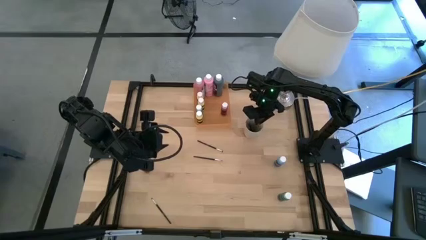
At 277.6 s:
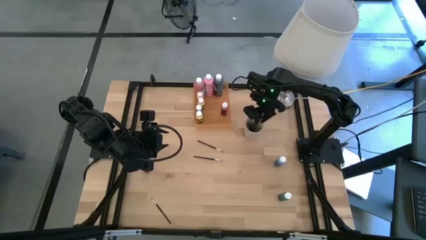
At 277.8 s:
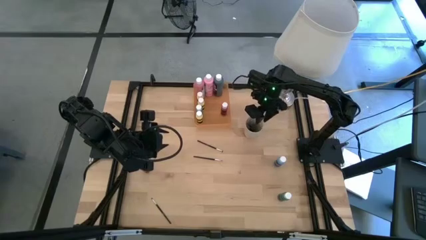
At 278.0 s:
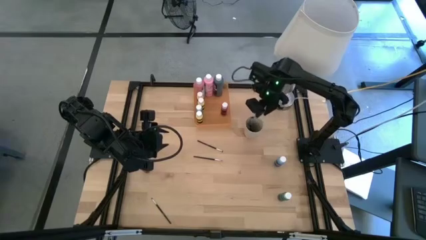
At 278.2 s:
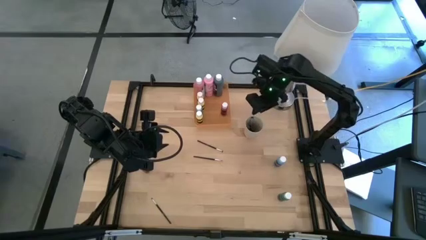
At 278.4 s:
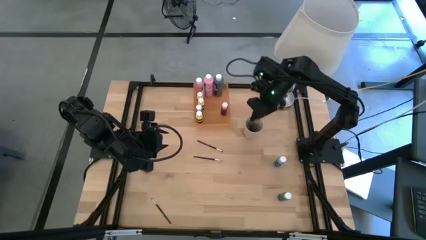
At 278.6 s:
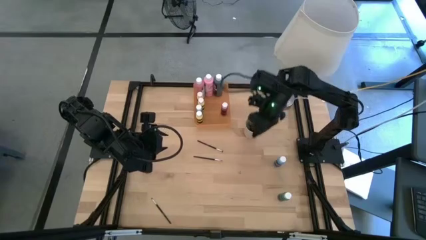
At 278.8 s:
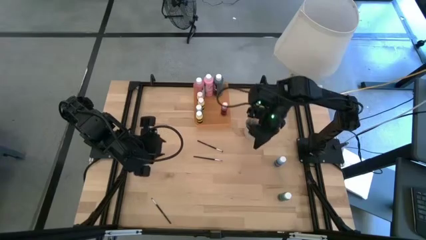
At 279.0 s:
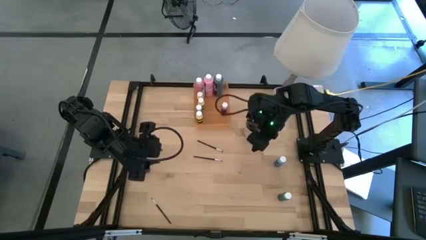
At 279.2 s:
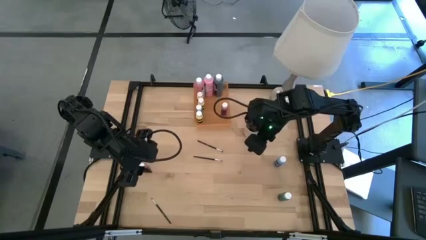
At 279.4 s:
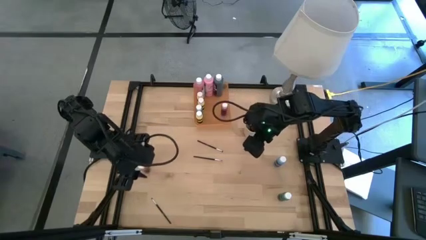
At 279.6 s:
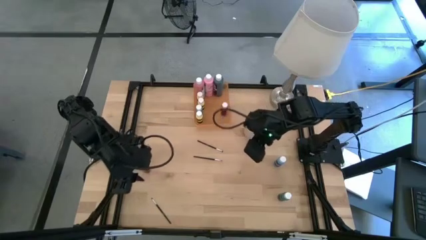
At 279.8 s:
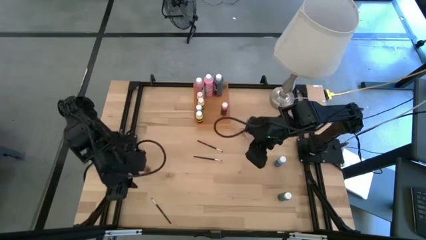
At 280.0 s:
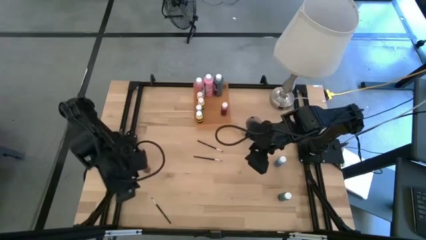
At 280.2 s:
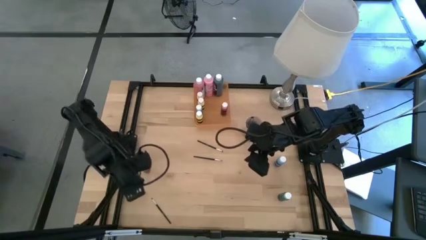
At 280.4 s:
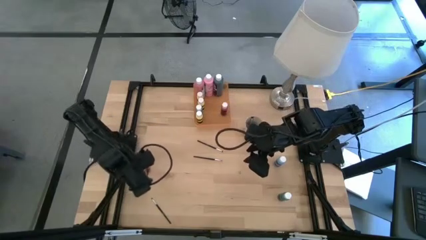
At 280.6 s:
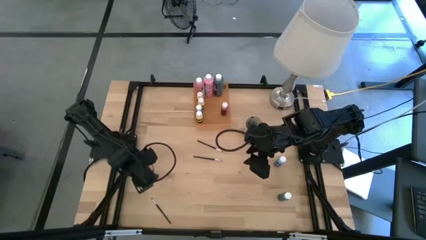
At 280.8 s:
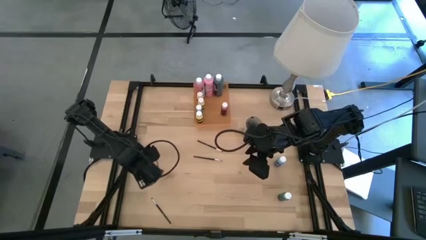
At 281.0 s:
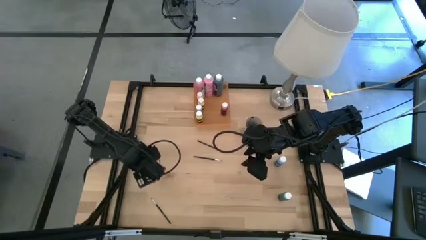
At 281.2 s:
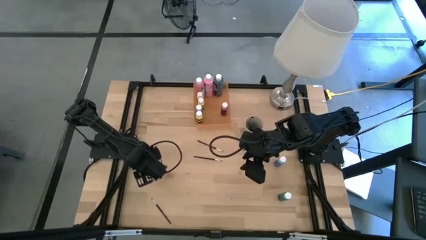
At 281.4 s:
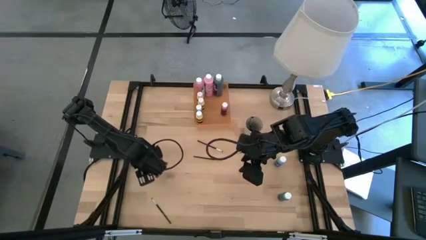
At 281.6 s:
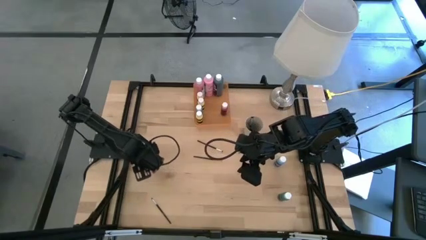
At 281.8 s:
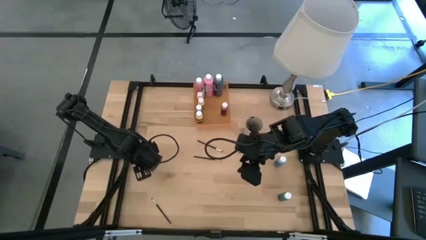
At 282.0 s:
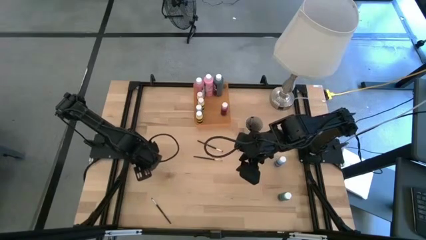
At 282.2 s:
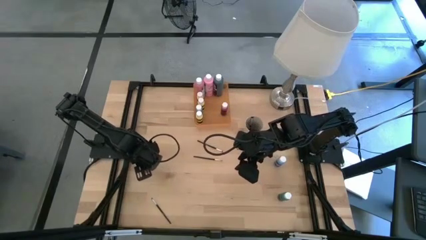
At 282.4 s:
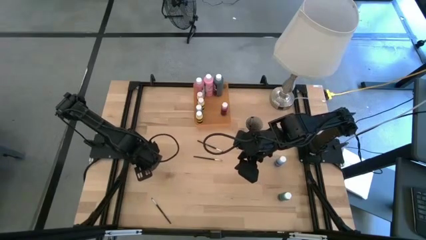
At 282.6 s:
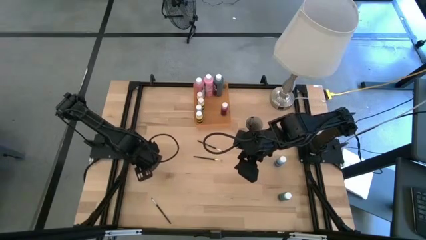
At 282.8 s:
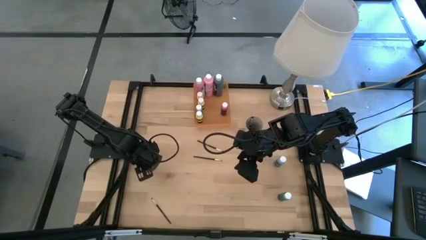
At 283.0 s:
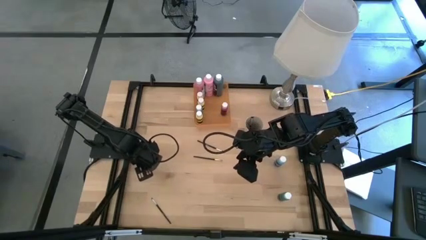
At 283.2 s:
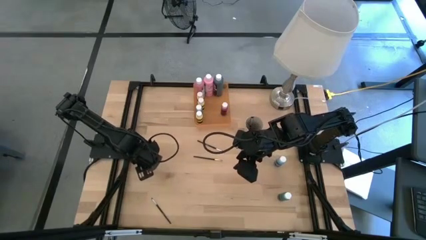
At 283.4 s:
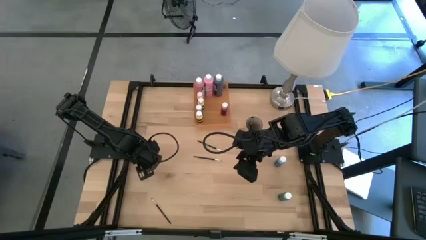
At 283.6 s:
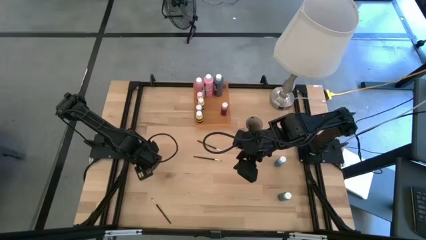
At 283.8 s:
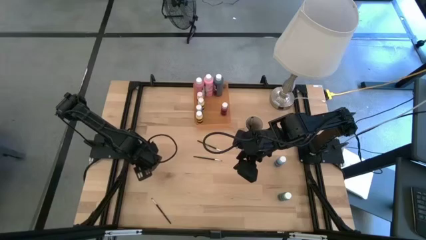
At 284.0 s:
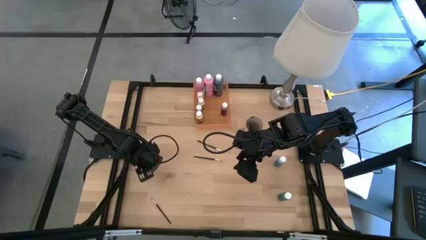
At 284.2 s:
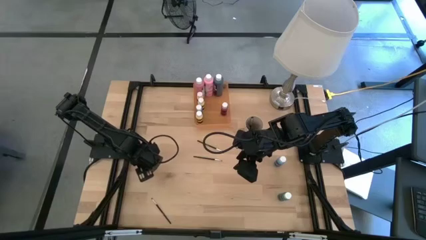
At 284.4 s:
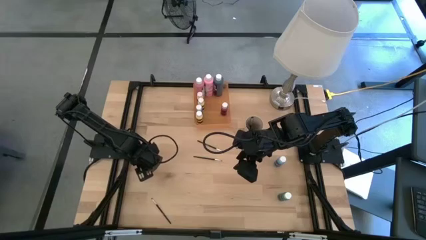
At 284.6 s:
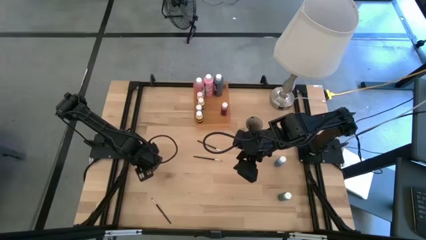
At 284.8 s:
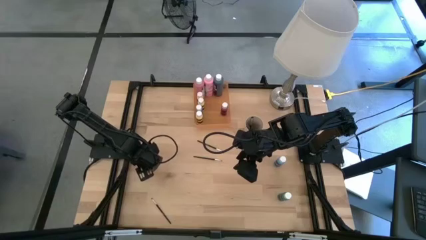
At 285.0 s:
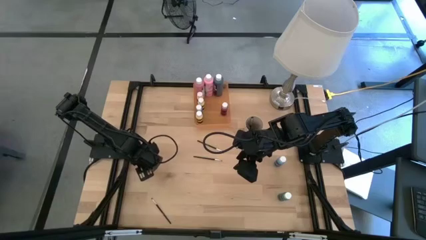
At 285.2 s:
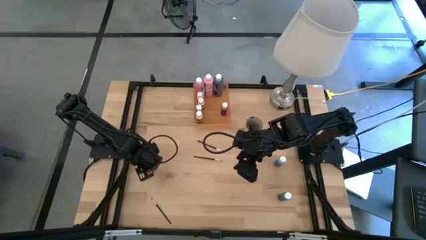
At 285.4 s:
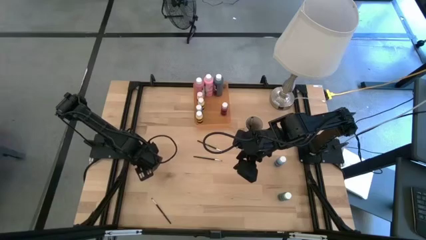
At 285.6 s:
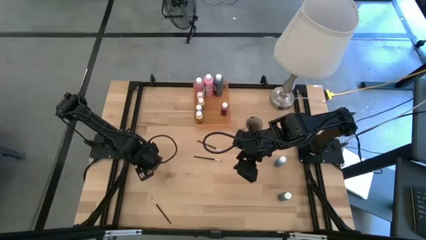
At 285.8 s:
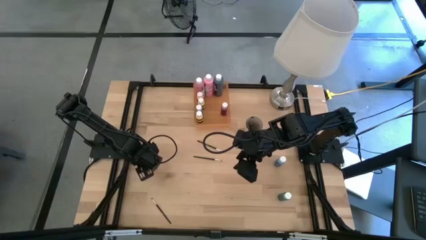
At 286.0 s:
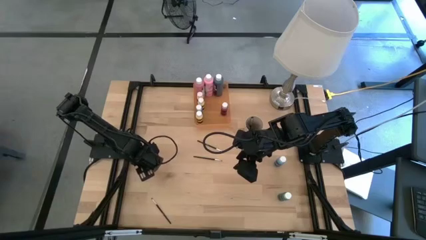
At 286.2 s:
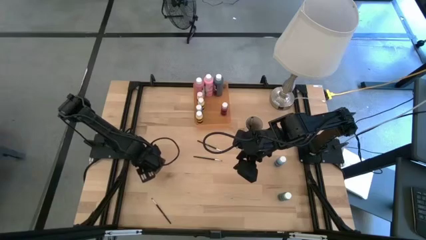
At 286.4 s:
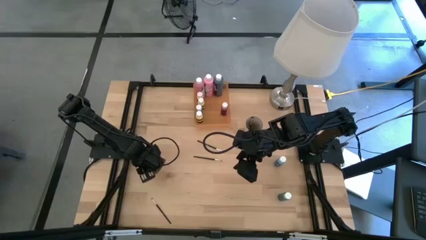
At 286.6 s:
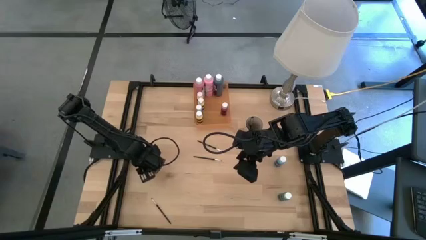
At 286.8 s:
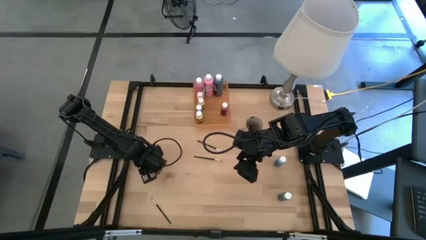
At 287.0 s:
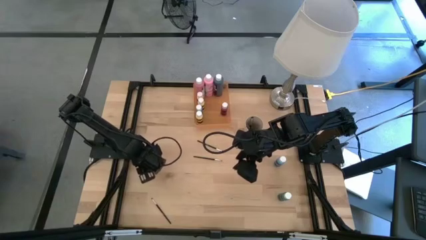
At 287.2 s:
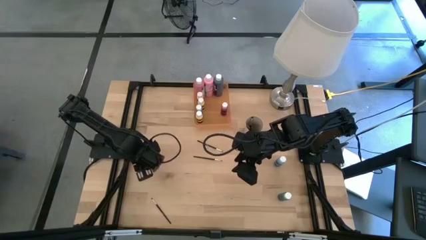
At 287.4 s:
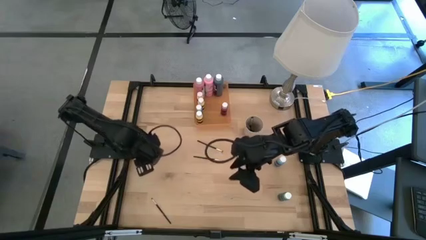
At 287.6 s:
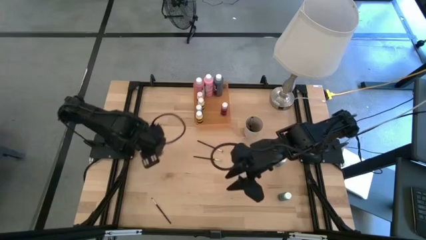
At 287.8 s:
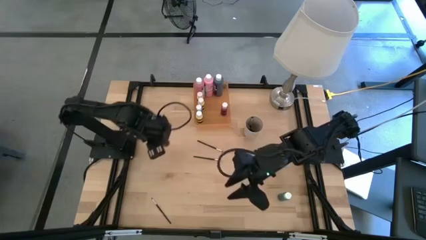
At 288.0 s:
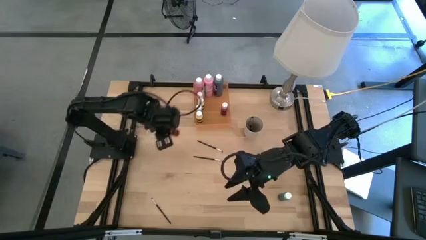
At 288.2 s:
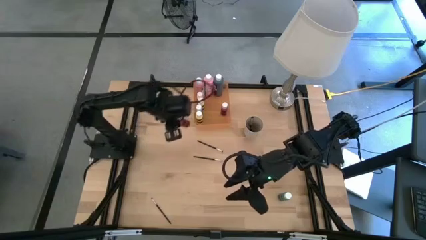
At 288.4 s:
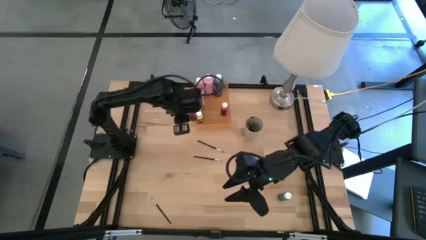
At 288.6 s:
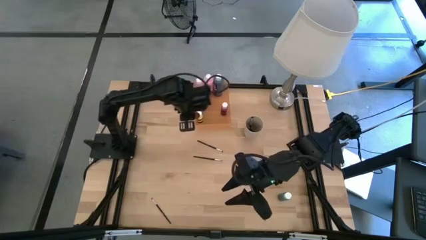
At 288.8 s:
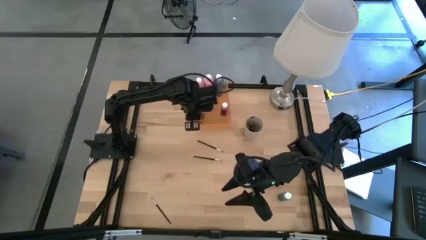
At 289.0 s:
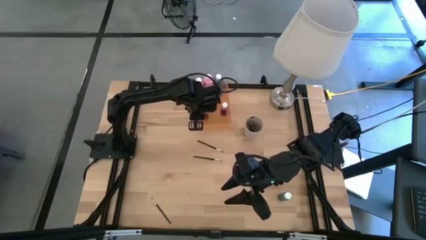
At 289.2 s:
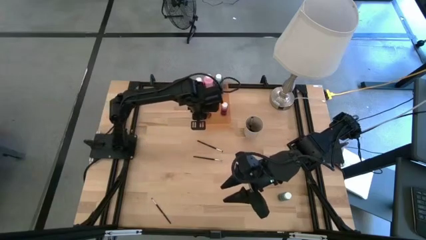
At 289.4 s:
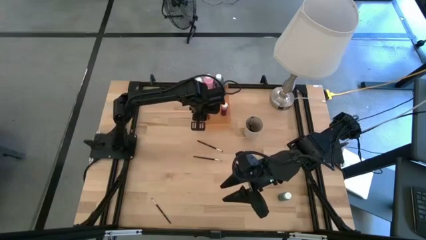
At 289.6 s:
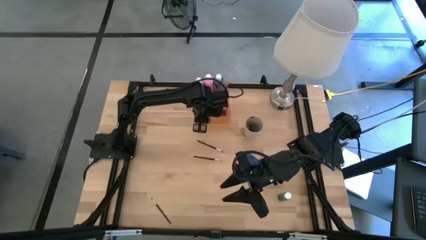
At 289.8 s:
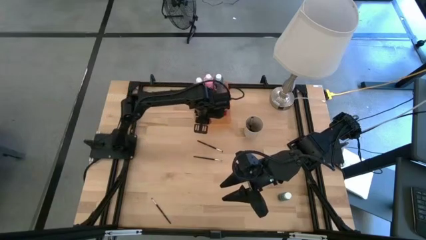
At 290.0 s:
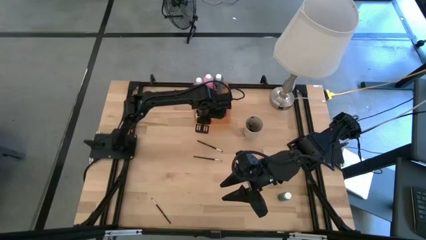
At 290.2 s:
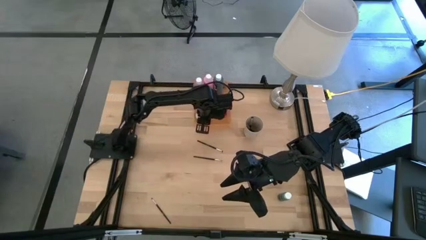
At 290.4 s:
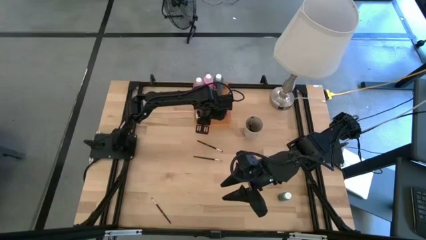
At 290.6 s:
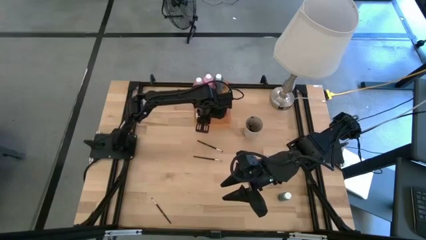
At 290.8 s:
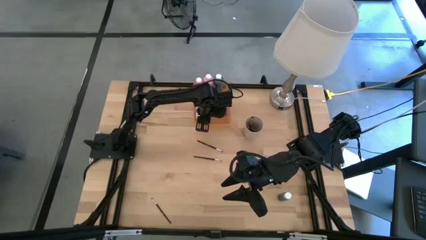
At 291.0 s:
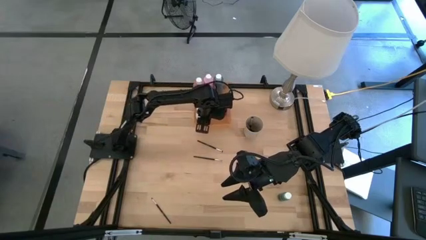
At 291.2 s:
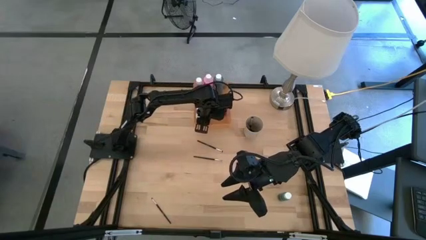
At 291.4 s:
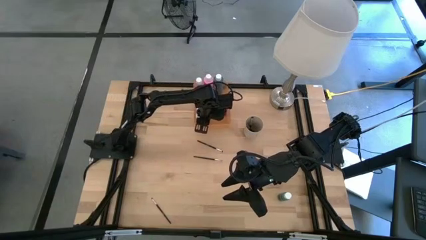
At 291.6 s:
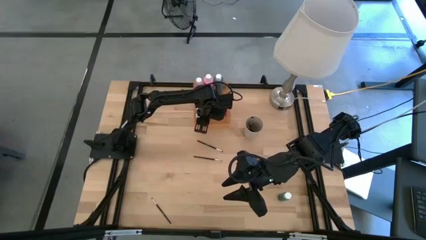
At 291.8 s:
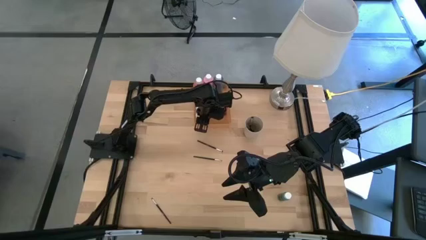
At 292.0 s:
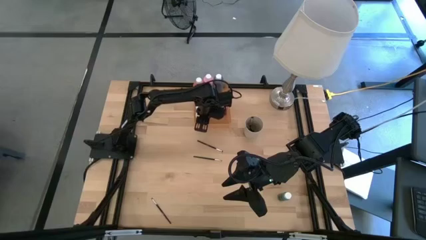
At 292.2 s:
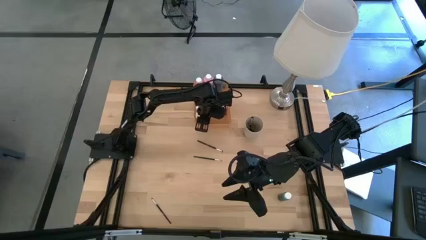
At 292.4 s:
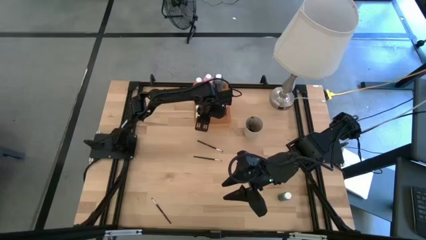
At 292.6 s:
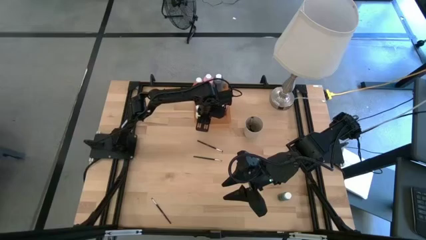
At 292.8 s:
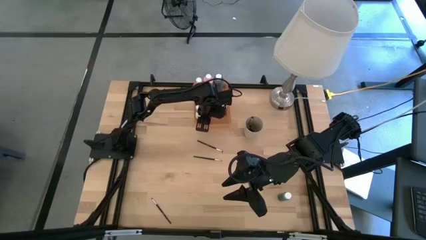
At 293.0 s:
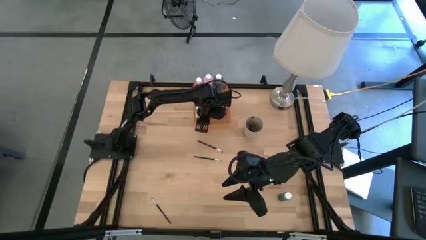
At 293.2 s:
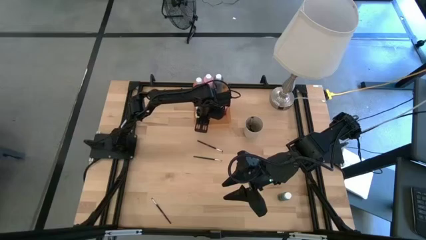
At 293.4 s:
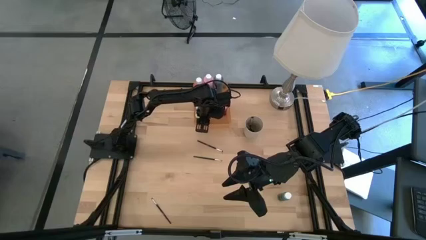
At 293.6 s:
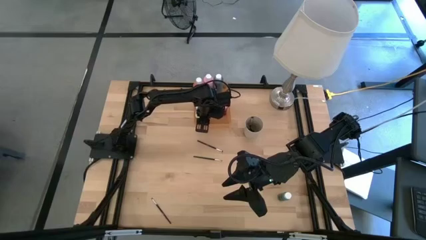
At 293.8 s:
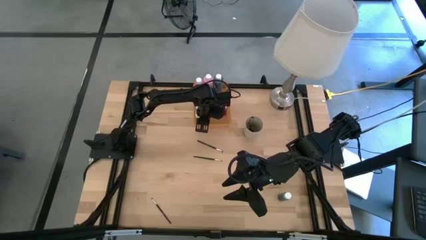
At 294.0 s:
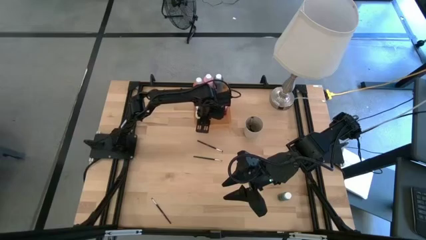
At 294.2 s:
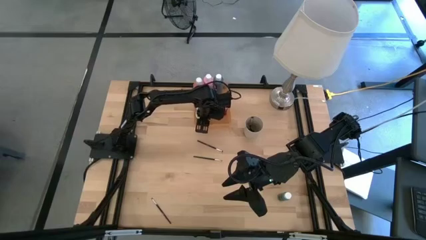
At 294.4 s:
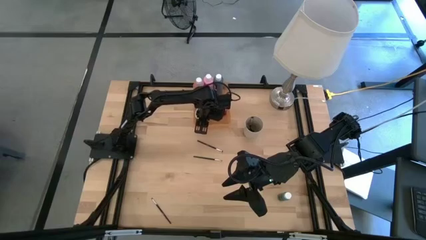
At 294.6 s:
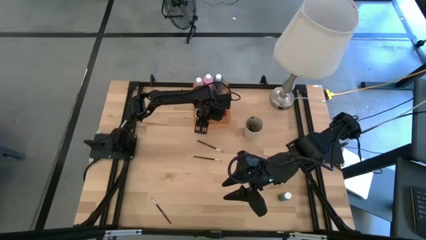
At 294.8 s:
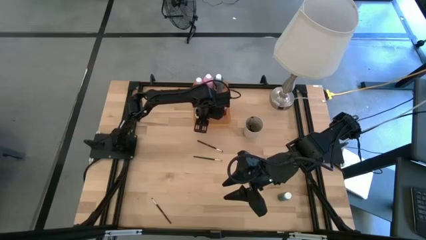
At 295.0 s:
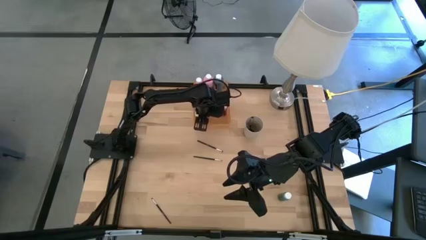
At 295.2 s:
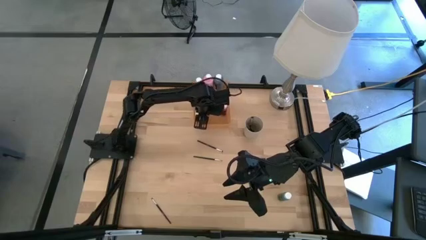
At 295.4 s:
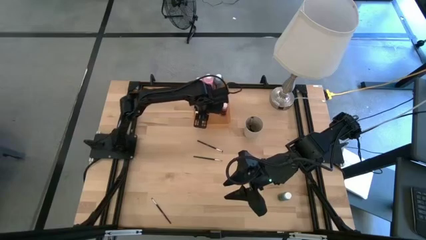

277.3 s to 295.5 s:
Task: Pick & Place Paint Supplies
Put the small red paint bottle into the orange bin
